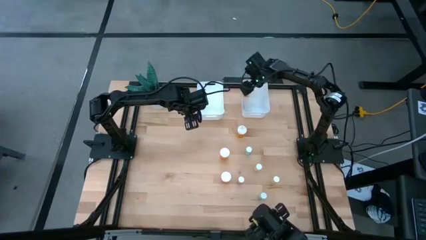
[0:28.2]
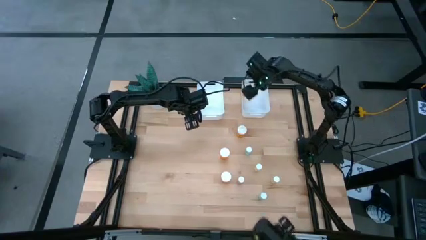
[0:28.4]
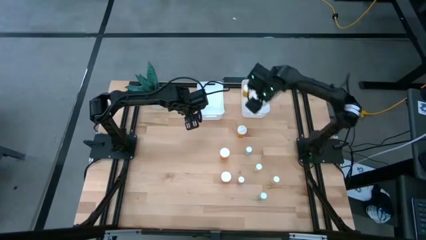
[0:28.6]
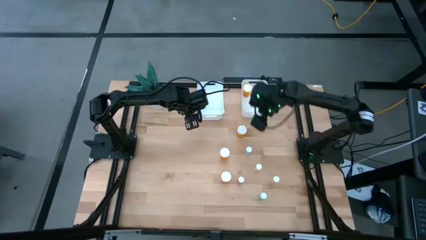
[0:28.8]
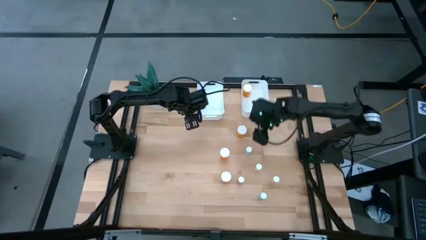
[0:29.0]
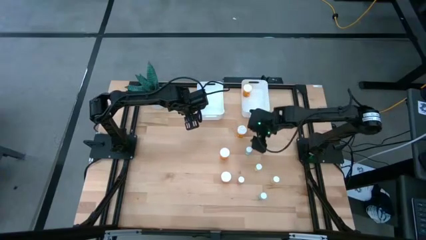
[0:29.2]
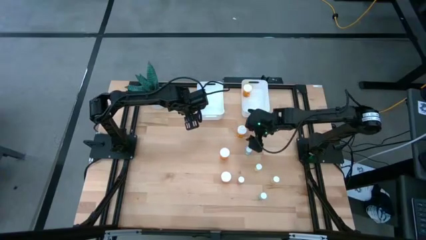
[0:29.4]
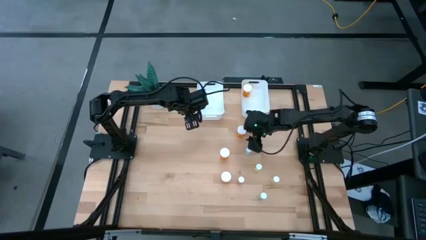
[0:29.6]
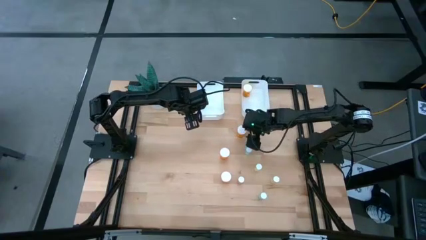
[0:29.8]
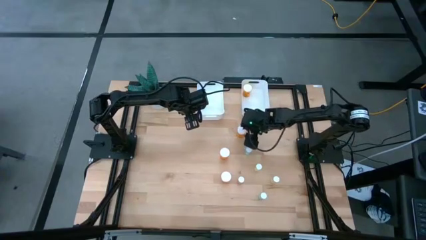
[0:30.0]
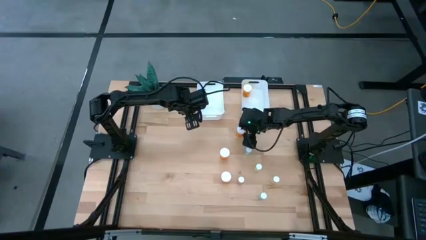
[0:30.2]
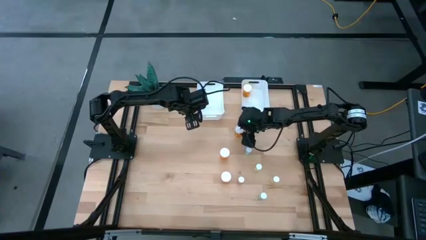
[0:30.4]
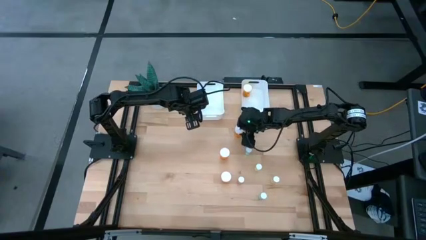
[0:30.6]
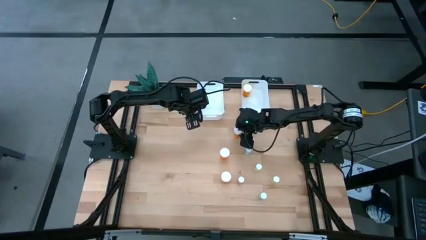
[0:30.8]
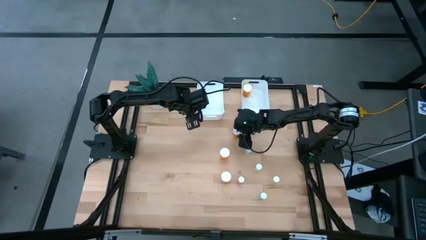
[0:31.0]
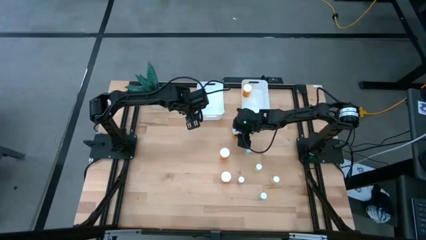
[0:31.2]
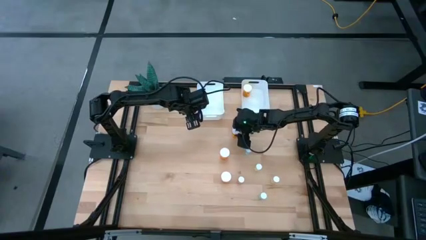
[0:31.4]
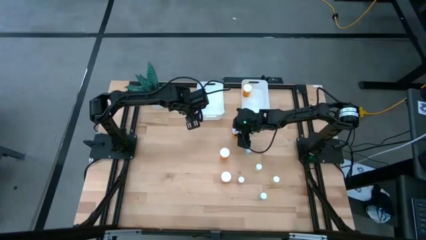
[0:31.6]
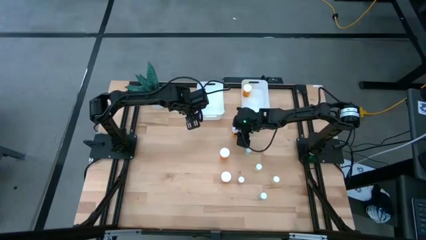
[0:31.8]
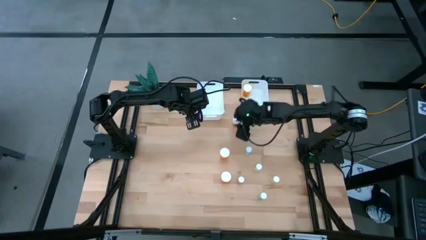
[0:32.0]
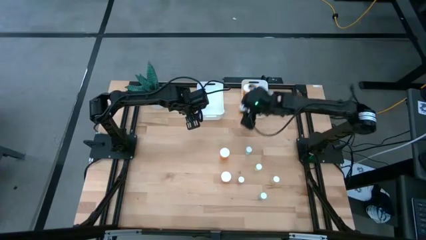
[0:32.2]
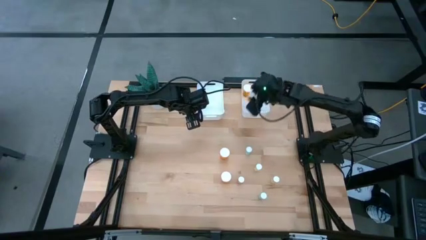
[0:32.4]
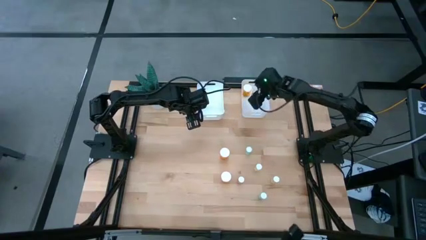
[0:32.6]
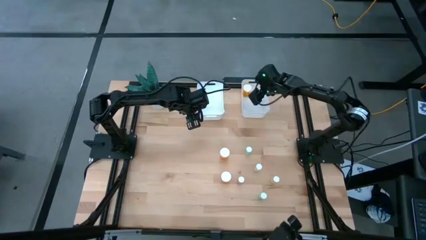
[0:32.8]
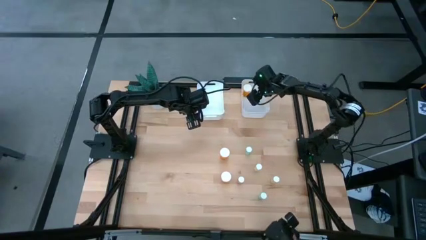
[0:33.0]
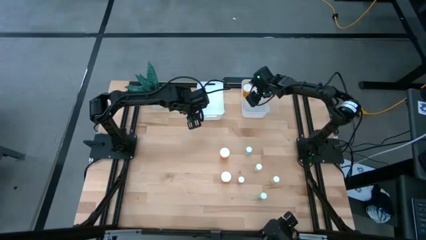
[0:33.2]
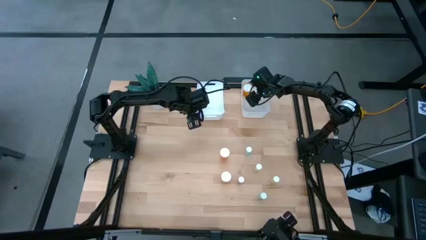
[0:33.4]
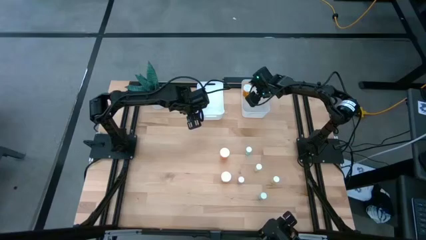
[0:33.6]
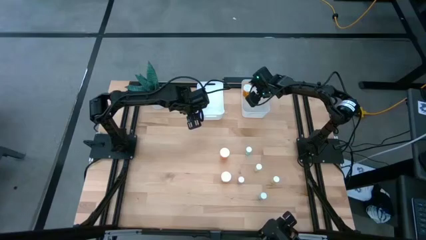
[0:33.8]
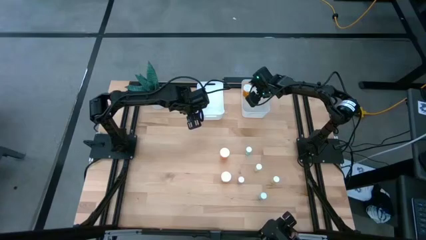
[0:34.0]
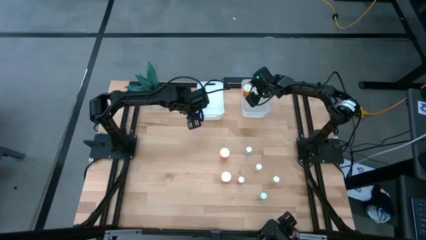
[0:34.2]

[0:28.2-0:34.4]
Task: Pick and place medicine bottles into bin by pill shape (circle, oval)
Put the big orange capsule bottle into the right white bin

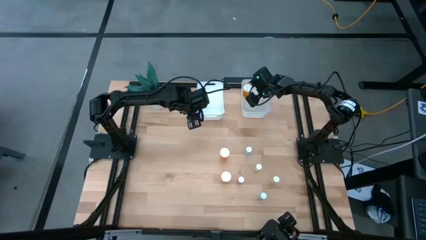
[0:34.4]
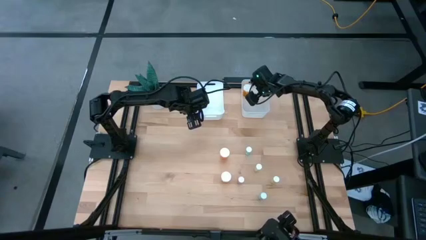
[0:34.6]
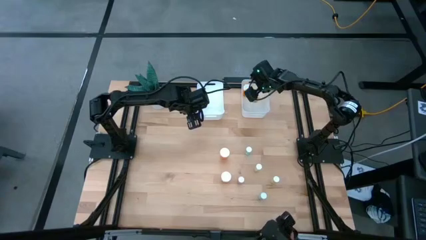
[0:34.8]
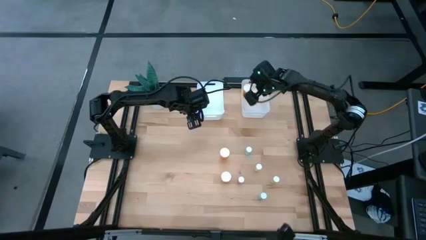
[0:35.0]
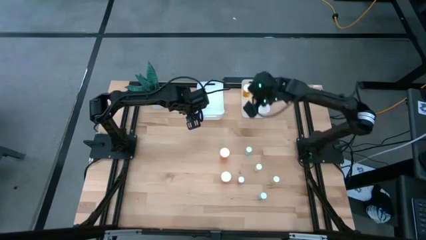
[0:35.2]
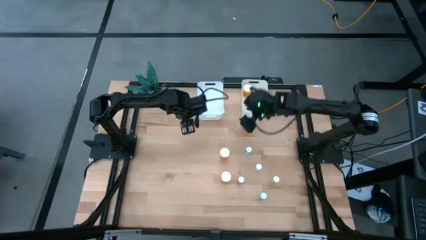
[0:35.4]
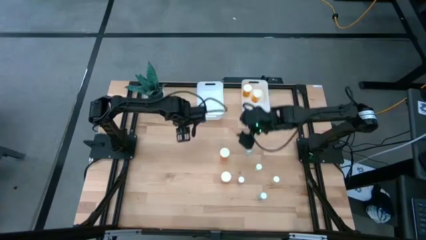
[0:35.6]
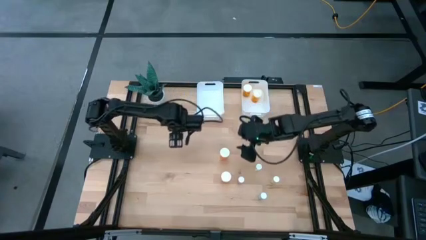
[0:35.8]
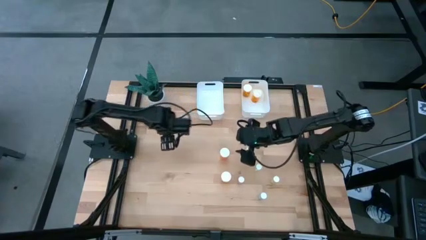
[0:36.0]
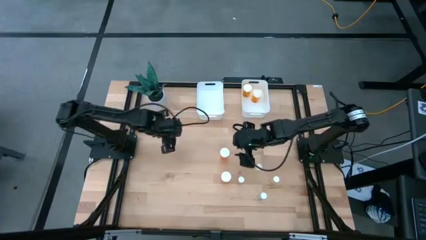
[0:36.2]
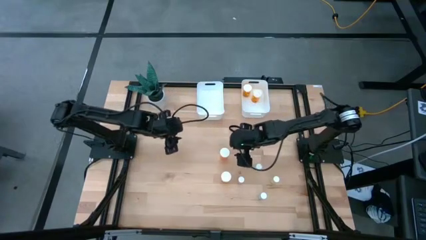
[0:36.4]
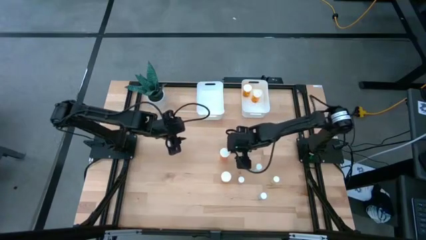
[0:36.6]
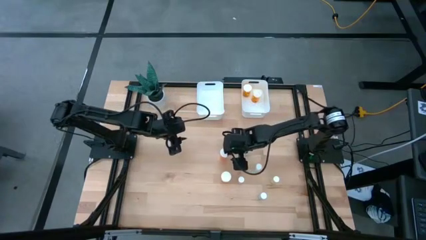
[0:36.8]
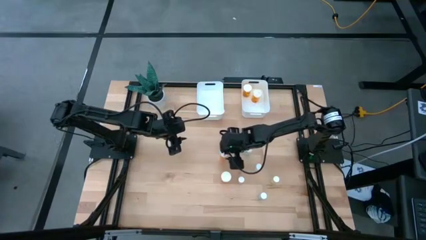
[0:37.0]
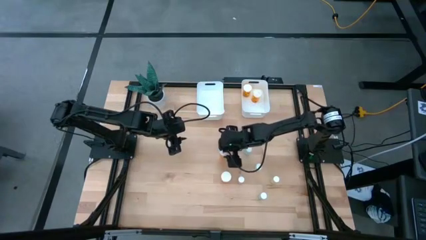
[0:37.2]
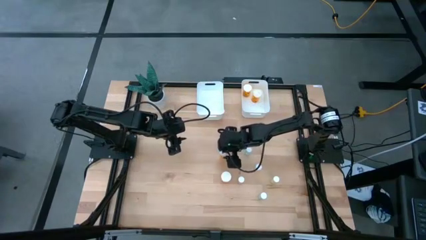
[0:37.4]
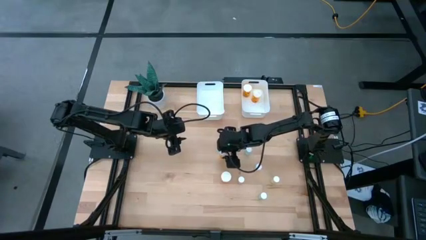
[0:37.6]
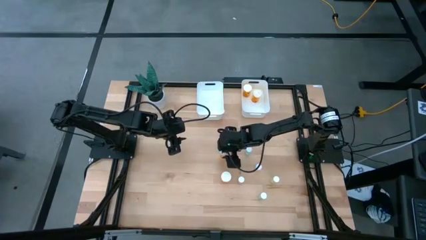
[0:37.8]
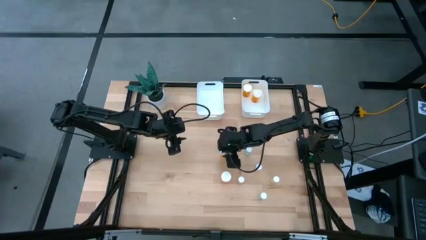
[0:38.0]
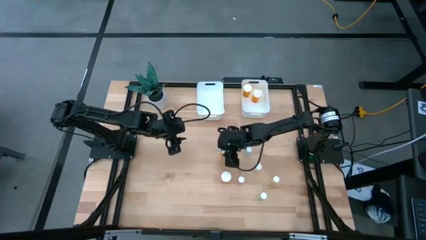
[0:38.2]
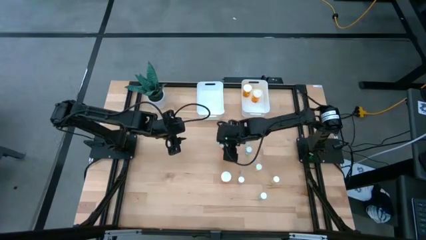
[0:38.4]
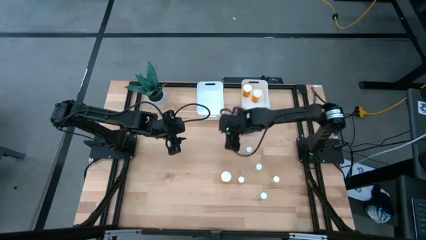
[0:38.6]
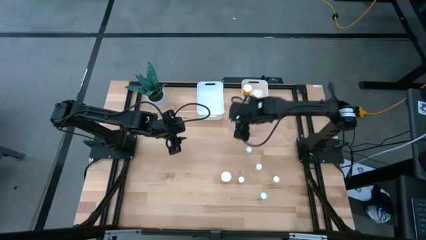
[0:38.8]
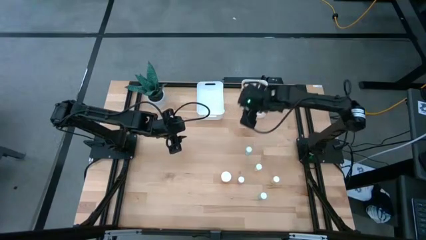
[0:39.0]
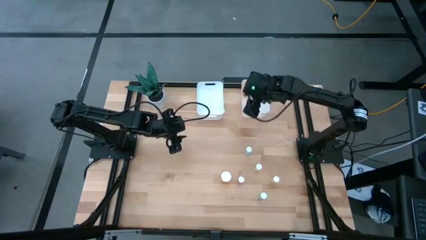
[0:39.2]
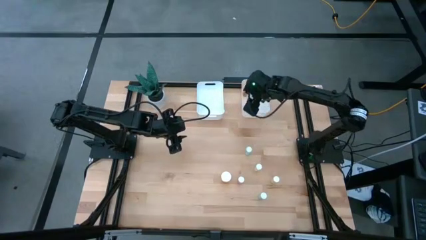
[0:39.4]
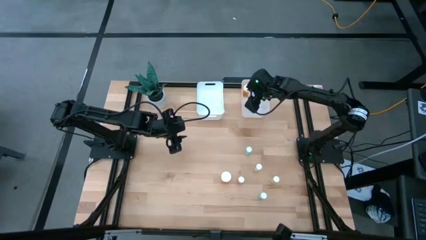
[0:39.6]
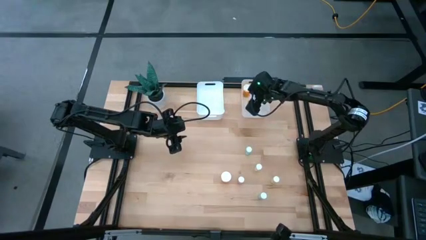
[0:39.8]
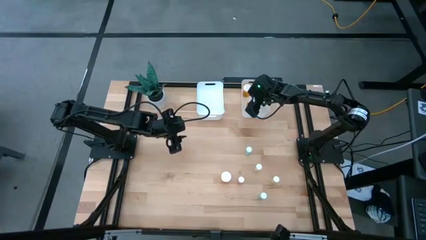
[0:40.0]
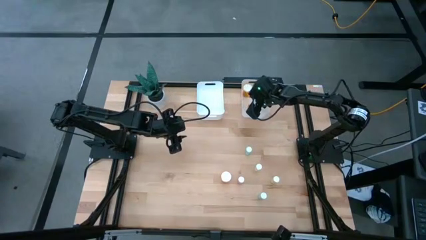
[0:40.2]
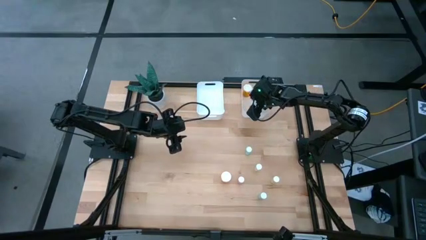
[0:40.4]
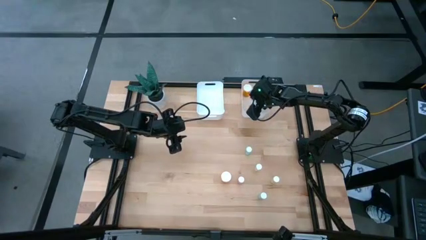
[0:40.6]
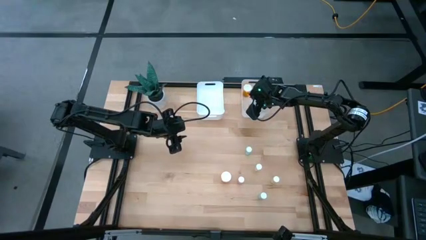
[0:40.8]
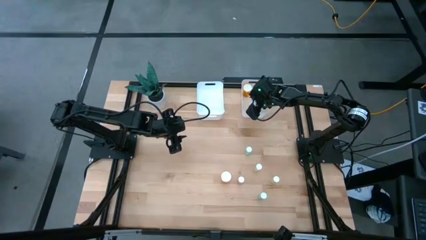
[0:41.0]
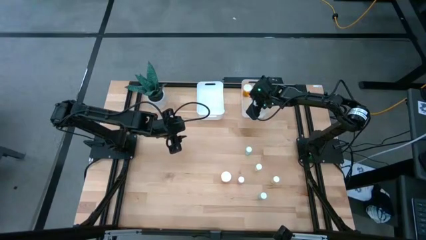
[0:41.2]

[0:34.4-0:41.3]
Put the big orange capsule bottle into the right white bin
